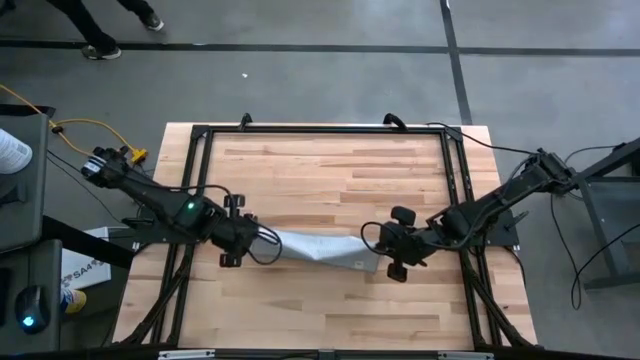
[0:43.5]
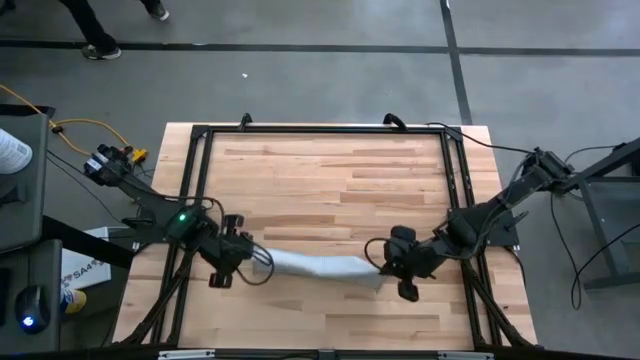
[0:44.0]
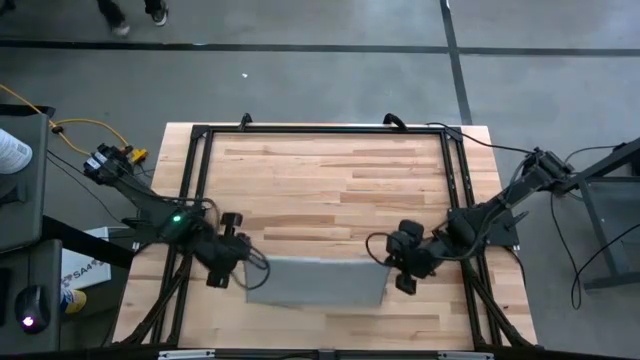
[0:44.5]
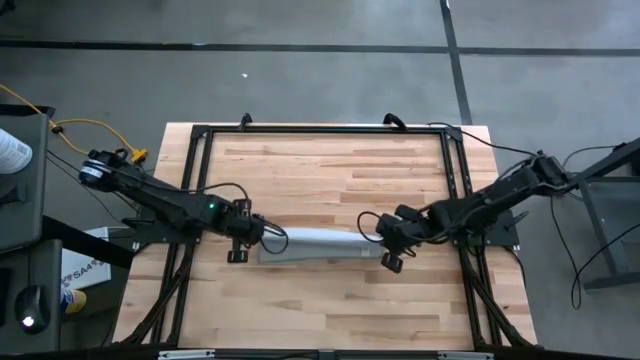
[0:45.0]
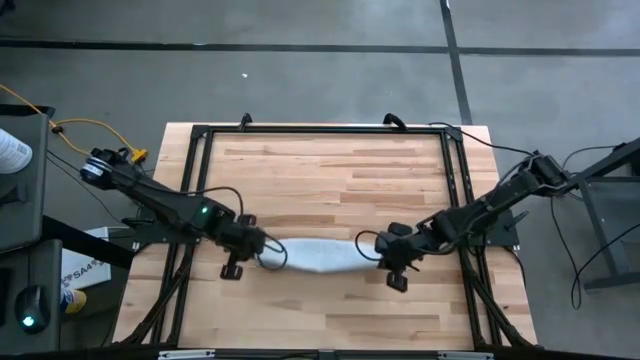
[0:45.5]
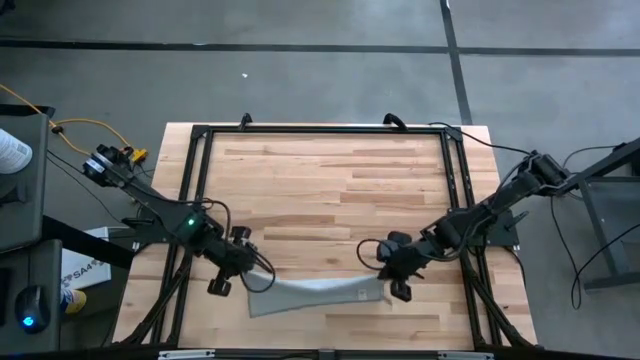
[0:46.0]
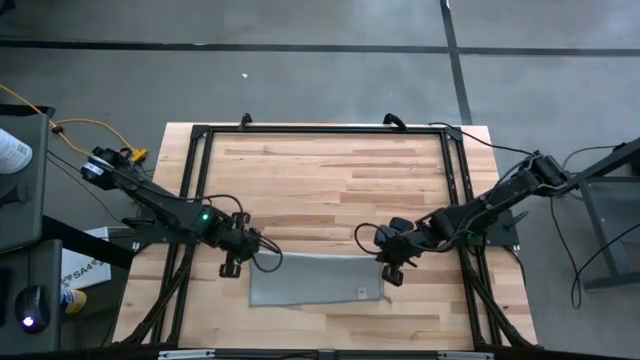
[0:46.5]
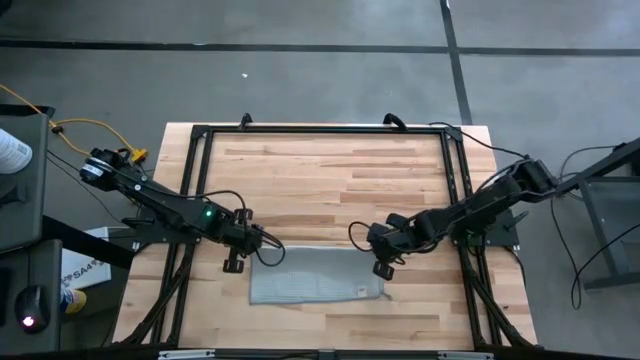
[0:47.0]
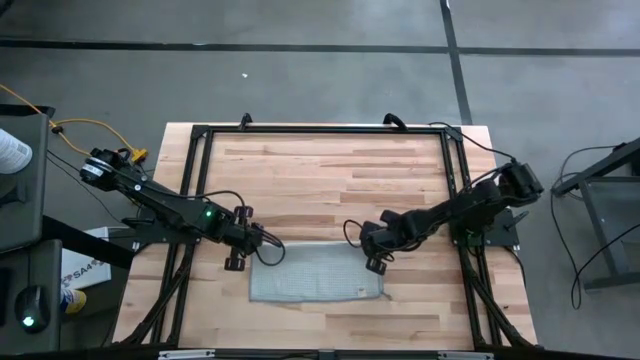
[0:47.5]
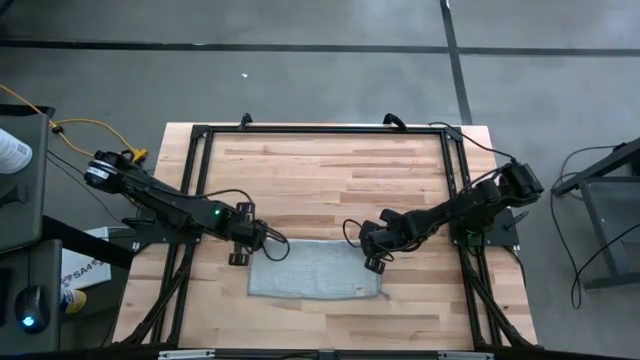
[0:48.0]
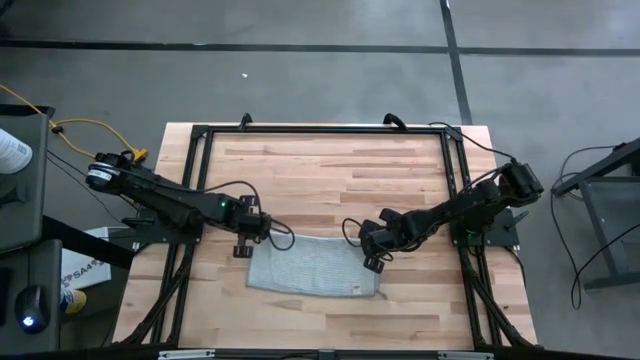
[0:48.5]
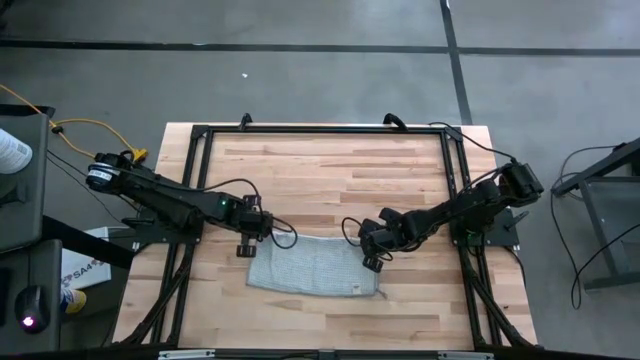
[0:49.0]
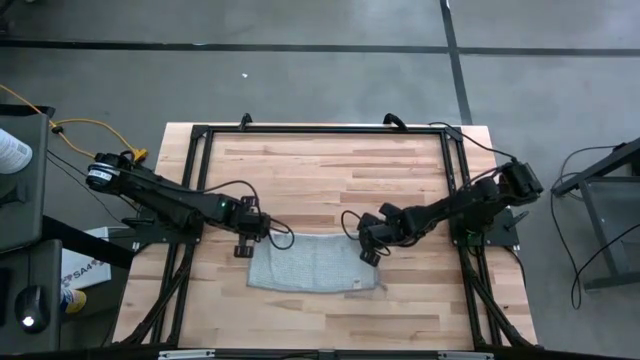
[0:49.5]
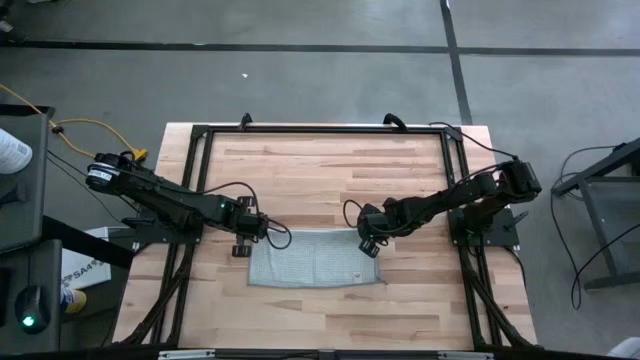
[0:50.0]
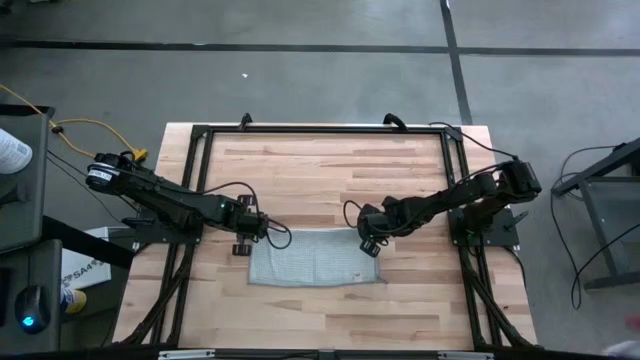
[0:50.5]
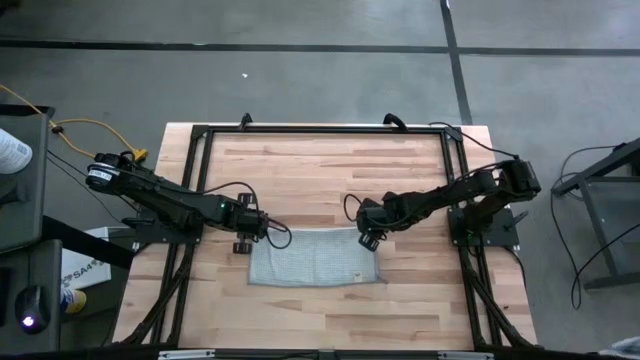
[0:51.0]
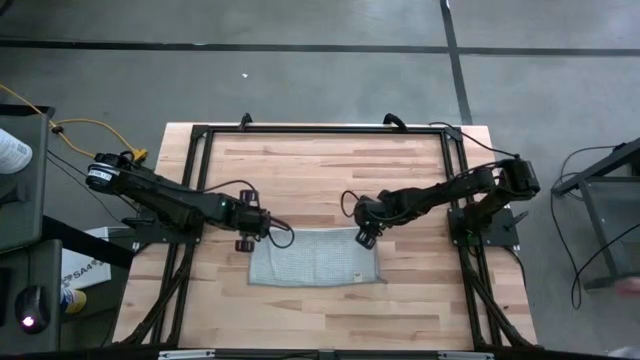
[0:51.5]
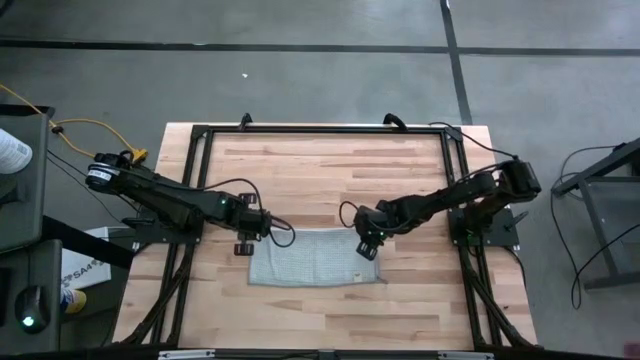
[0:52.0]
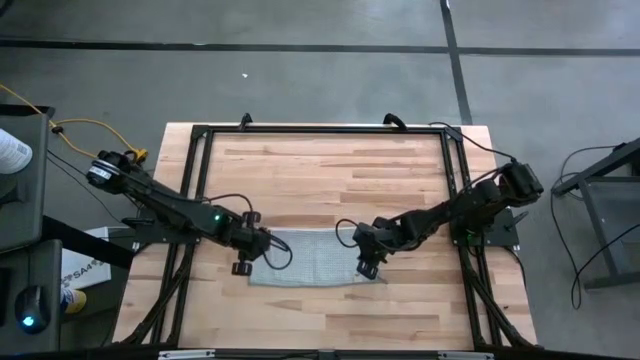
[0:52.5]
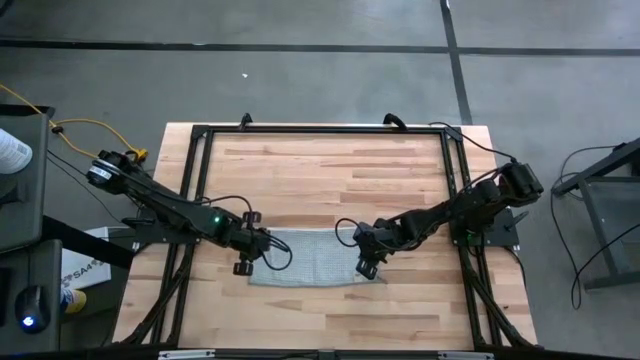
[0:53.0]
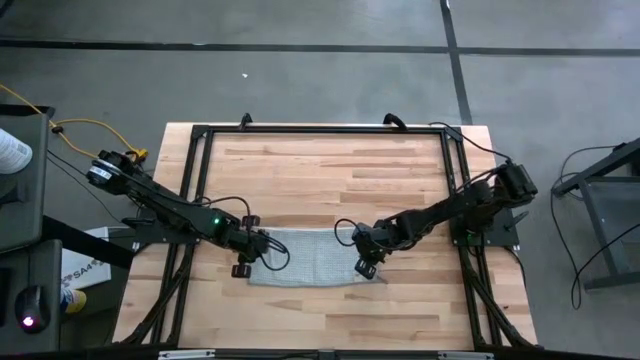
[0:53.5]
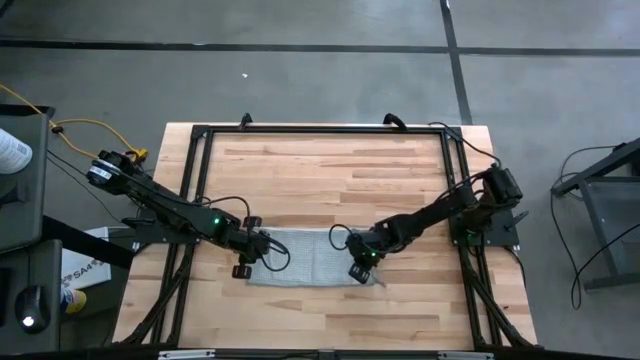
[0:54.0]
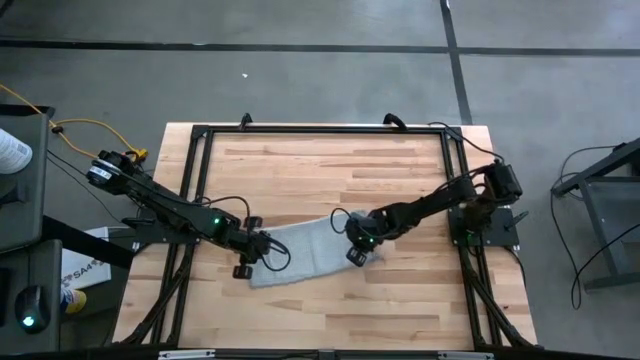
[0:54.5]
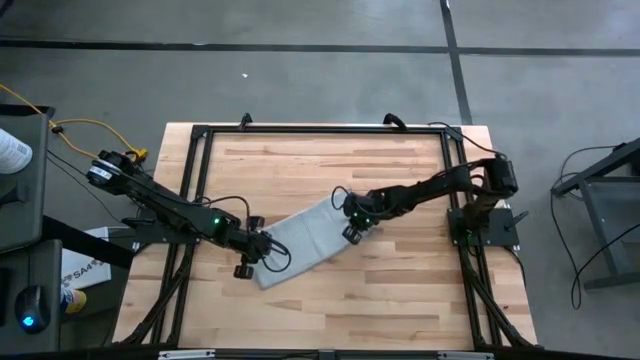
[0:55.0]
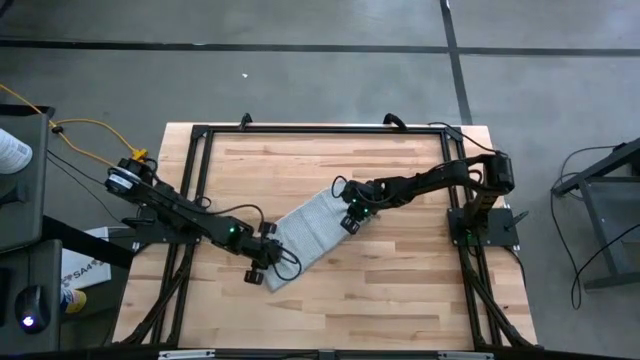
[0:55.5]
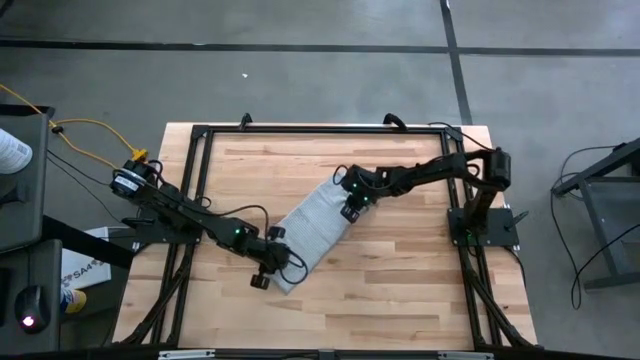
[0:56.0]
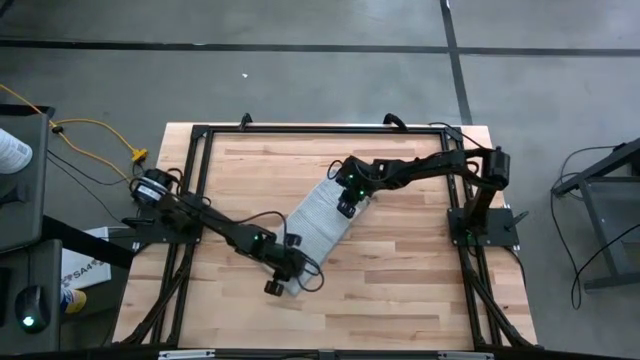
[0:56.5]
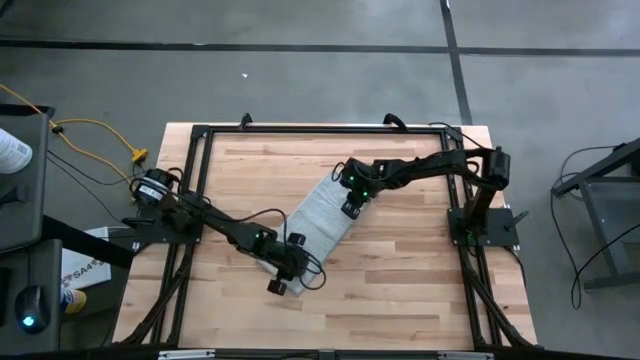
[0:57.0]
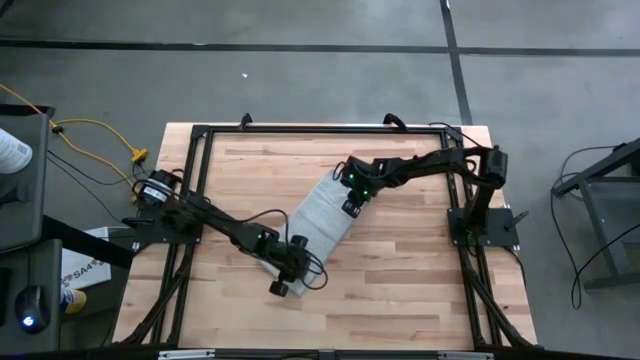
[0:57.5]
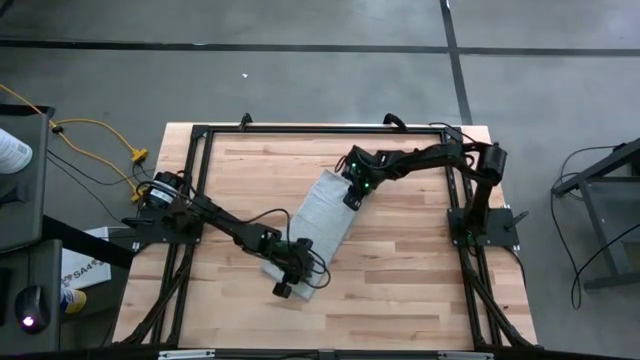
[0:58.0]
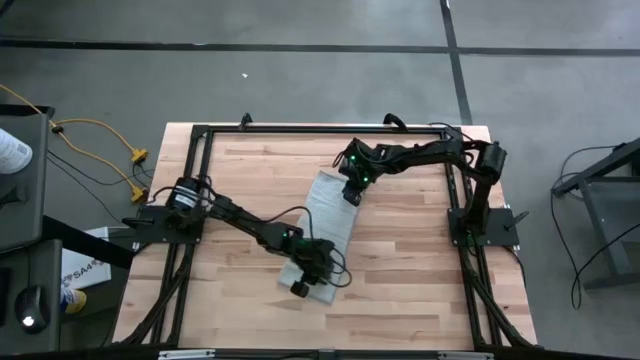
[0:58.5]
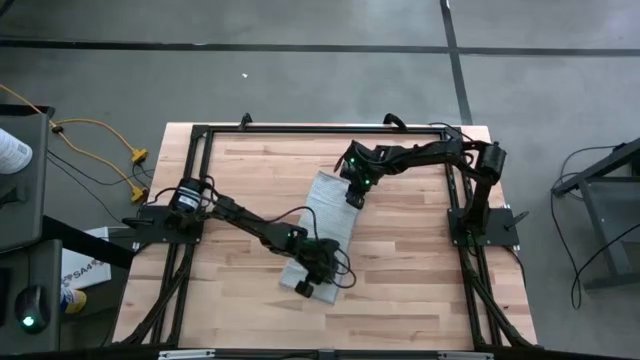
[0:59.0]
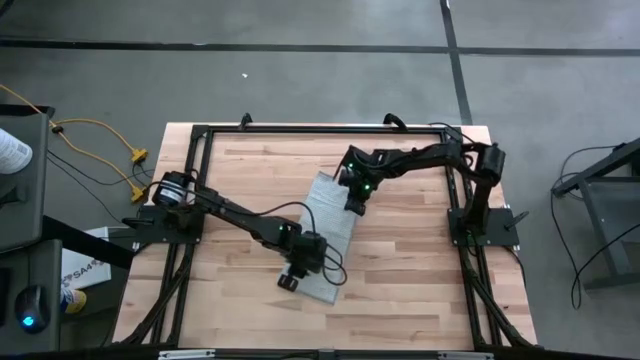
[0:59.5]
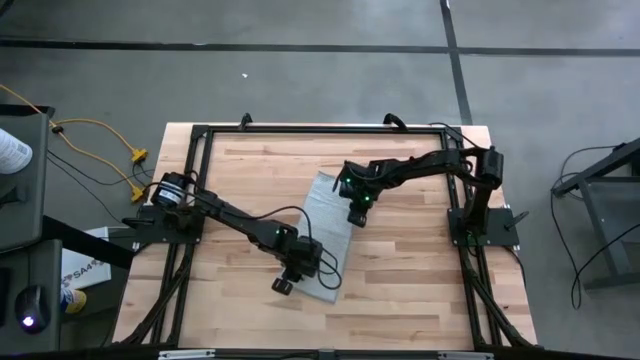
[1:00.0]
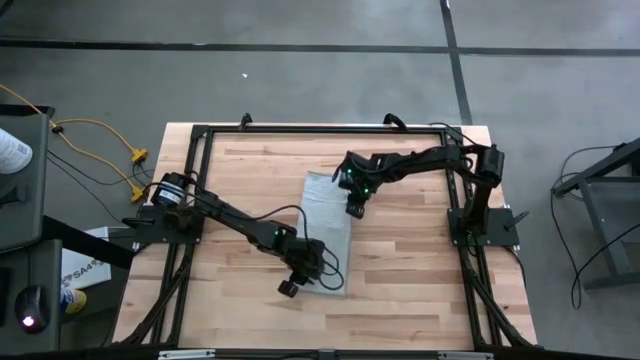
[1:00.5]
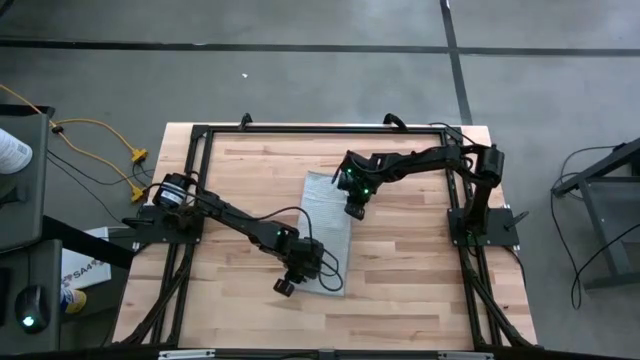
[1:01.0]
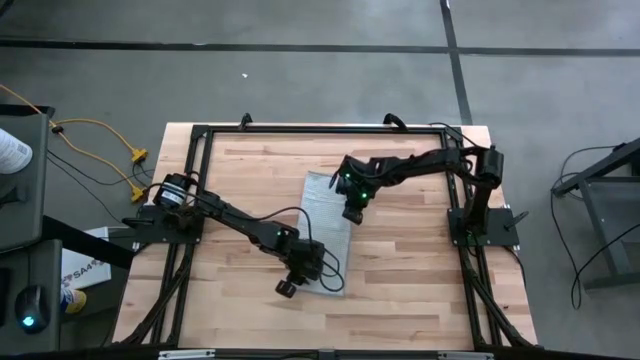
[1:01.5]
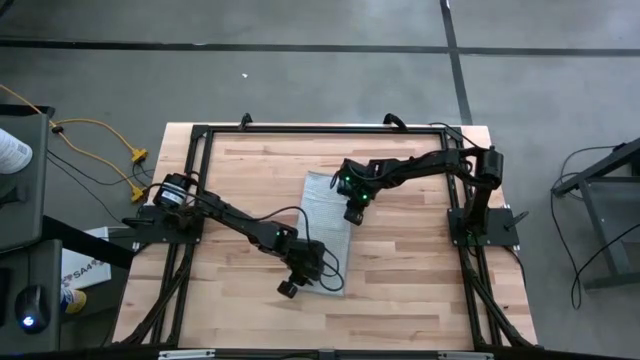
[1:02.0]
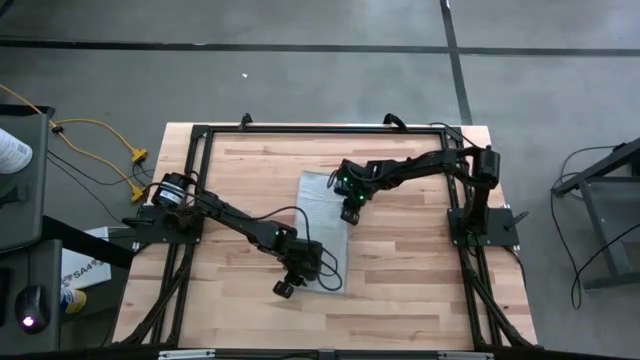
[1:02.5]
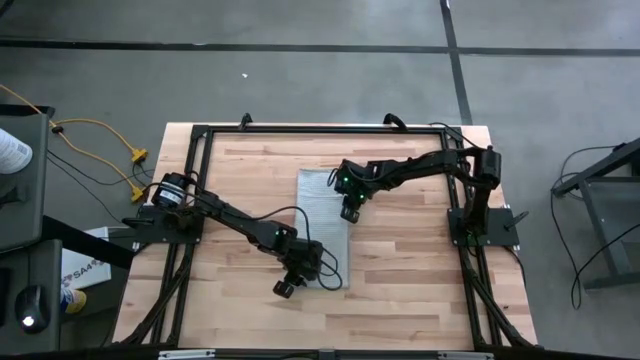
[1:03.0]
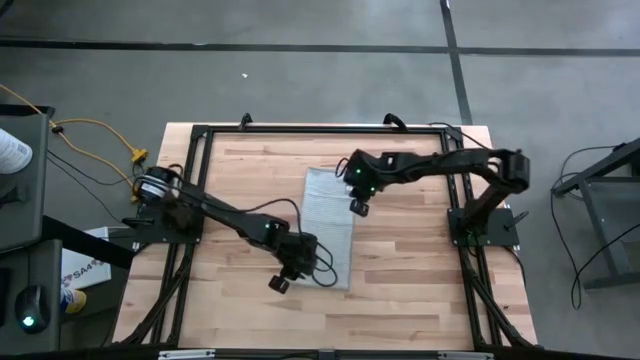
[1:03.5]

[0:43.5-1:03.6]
Task: Fold microfiber towels
Fold the gray towel
